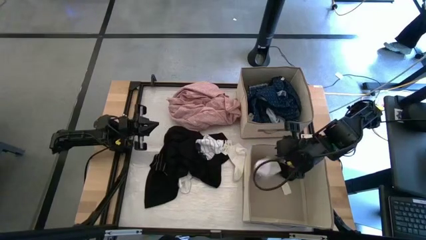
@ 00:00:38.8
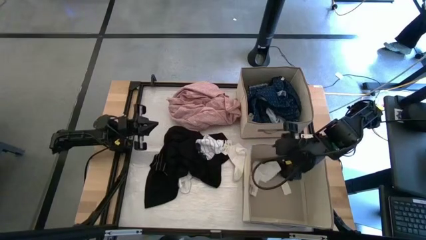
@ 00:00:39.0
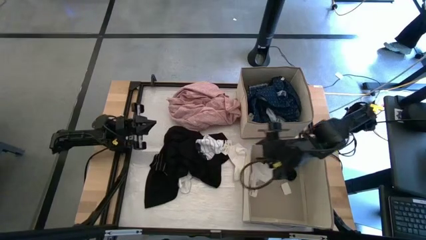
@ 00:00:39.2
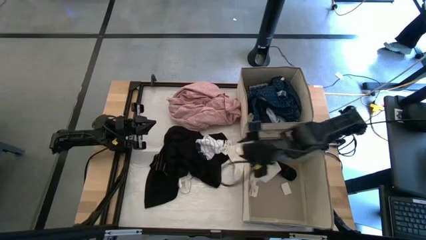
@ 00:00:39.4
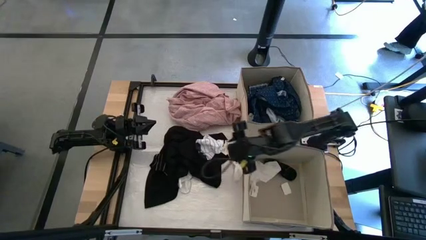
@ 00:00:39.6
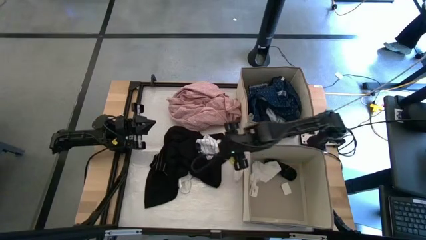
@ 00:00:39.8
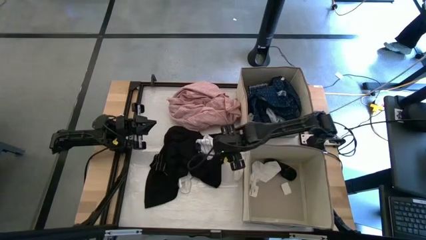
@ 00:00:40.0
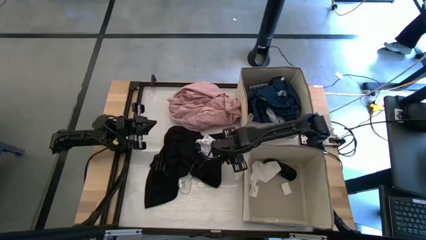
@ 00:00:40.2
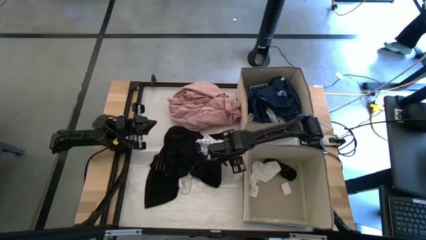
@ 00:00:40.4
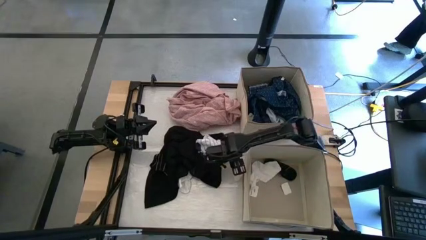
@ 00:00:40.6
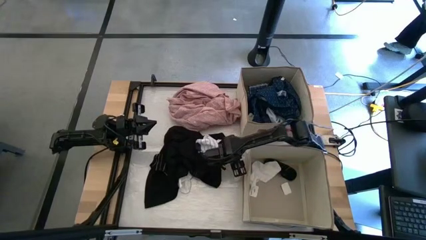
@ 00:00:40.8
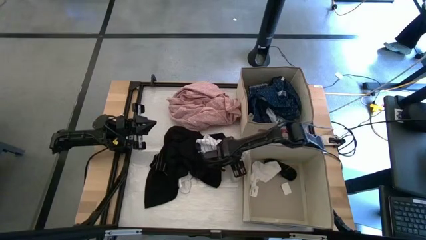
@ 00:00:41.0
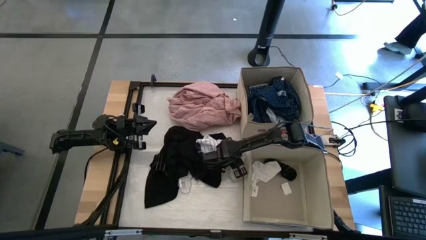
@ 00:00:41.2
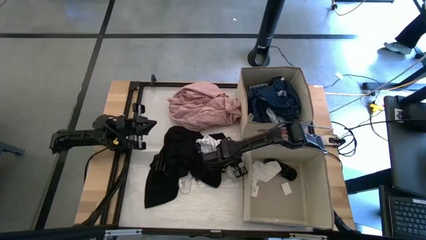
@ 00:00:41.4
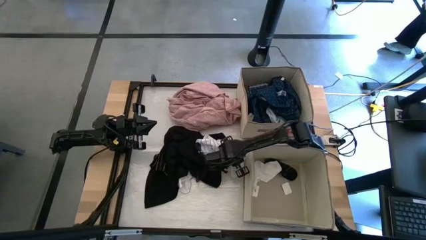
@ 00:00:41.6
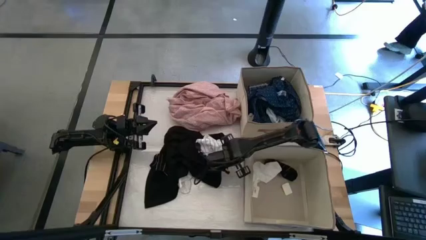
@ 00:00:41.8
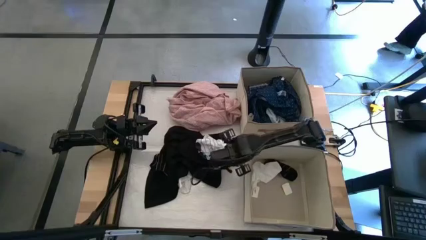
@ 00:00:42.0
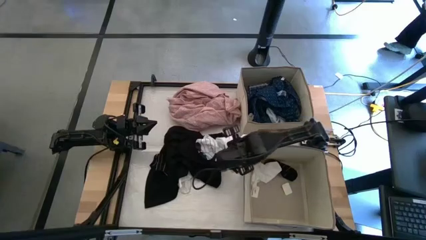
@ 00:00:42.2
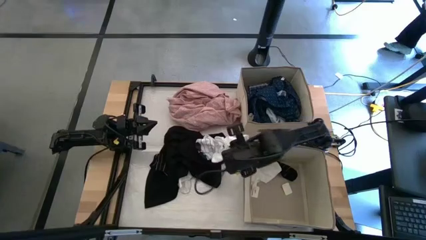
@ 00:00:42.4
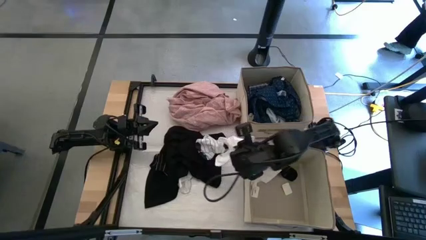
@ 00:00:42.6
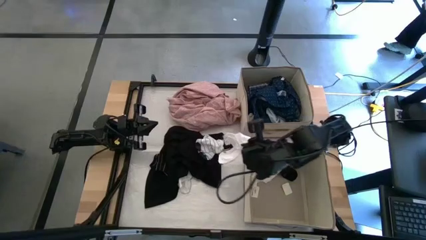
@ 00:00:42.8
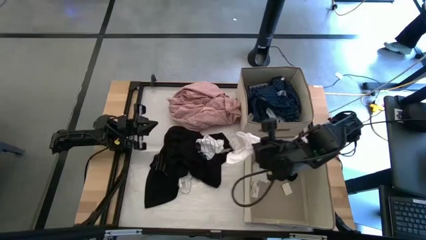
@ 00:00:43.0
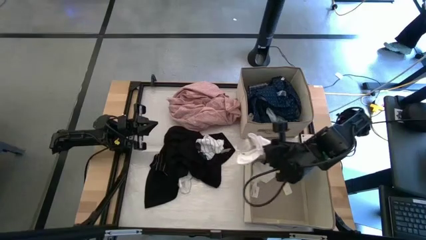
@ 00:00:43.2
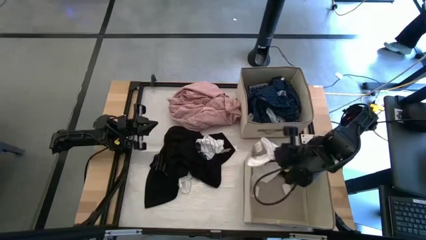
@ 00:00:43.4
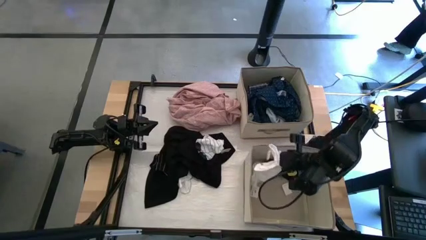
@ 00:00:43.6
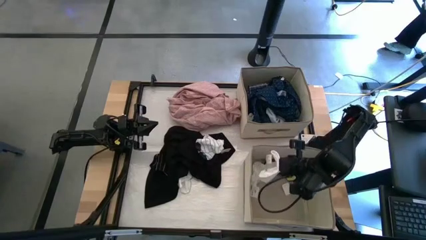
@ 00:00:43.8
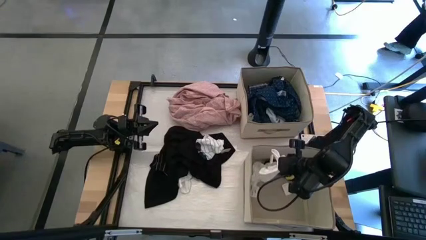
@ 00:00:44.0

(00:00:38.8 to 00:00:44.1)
Task: Sort clothes
Put the white sock into the bottom laundry organizer

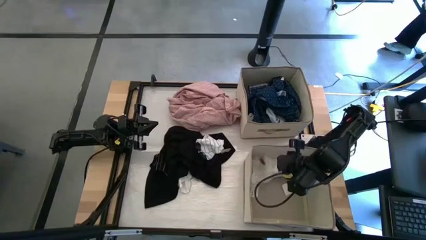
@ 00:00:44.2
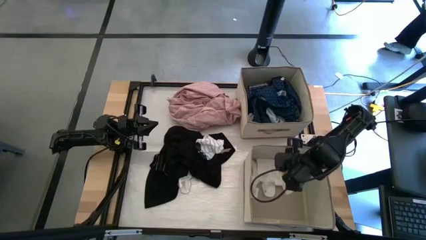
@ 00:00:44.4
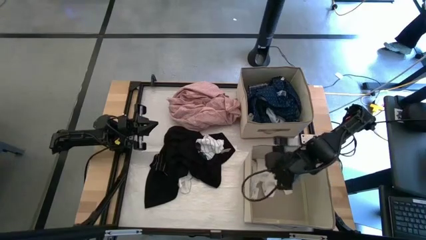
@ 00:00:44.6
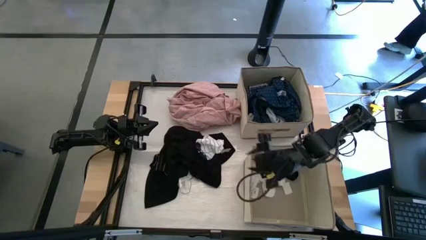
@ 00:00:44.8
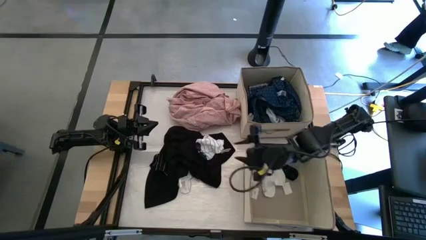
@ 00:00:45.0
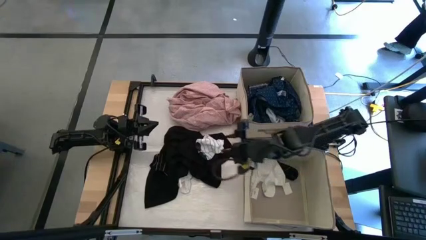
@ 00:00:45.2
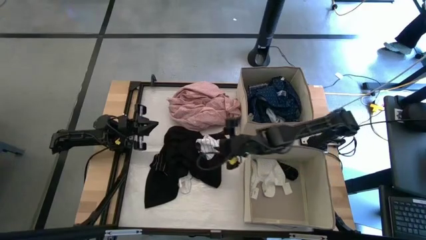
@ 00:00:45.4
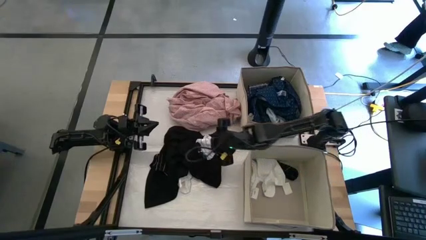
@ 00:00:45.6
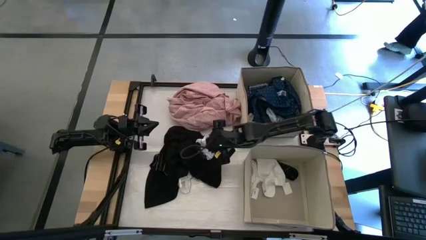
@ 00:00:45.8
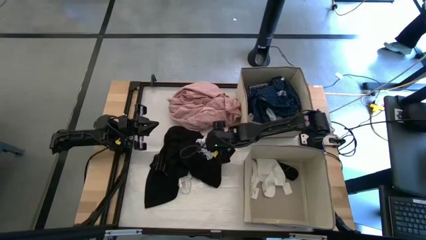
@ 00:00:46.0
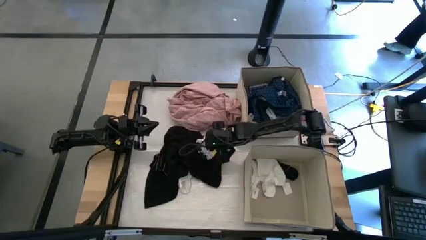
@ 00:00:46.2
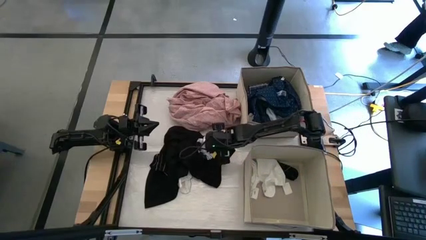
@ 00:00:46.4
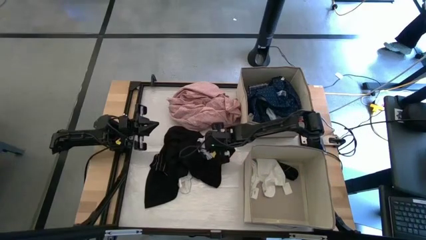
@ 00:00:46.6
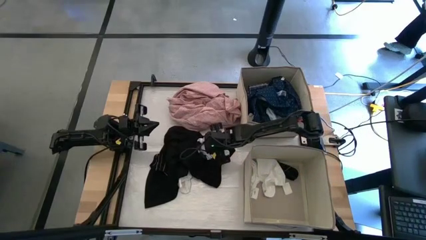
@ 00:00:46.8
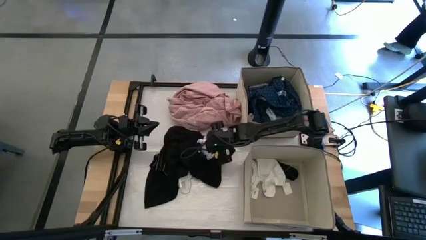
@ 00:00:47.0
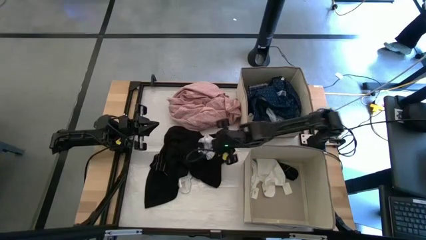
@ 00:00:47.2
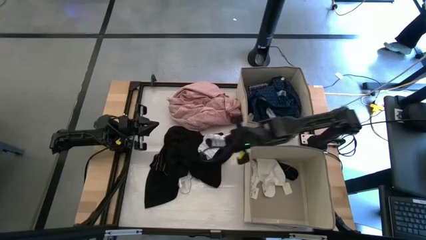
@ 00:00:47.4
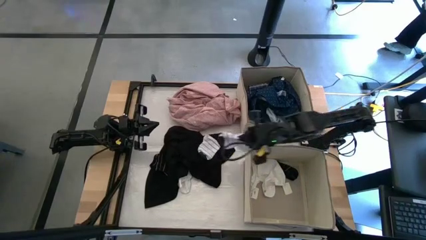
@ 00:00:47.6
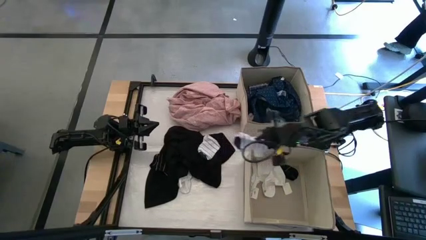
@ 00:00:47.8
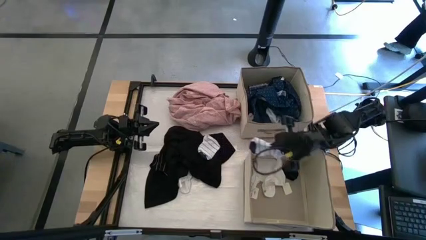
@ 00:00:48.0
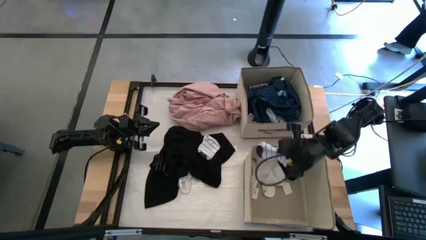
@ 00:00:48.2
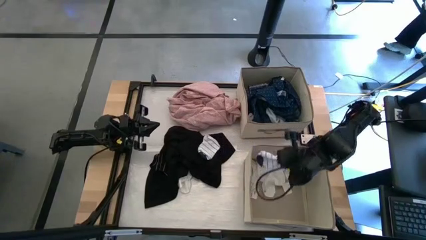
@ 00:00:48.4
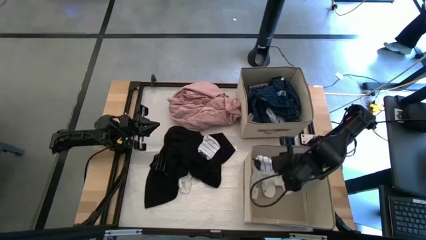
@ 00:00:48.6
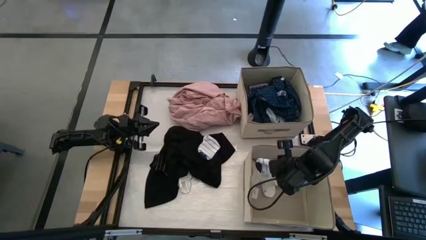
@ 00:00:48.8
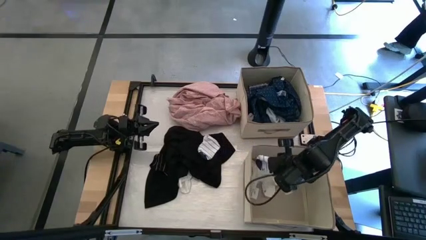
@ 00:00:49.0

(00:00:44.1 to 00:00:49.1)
Put the white striped sock into the bottom laundry organizer

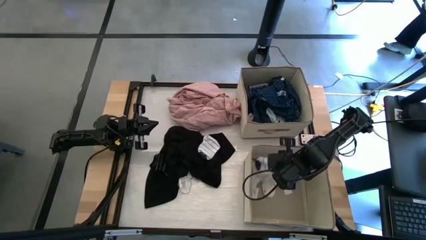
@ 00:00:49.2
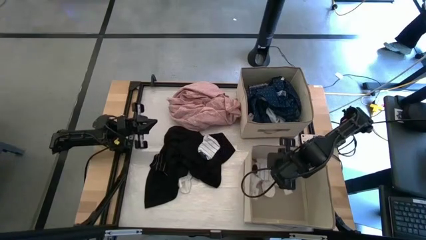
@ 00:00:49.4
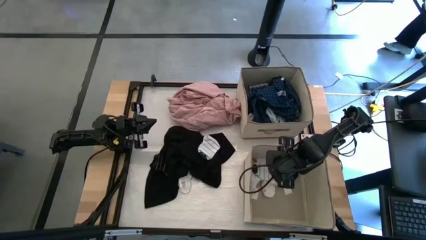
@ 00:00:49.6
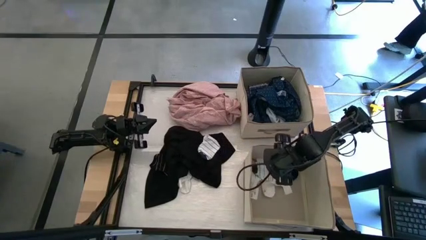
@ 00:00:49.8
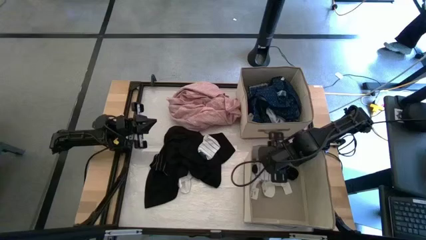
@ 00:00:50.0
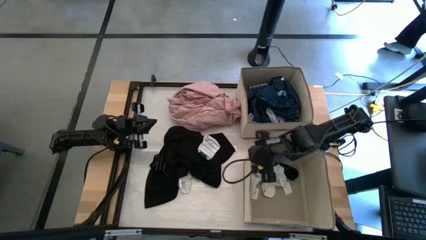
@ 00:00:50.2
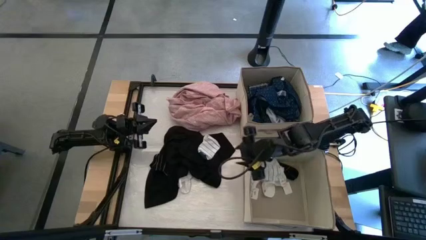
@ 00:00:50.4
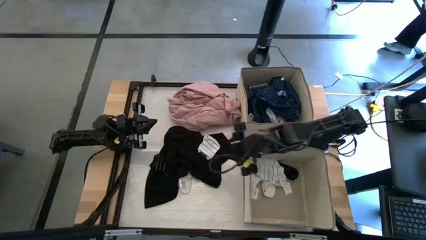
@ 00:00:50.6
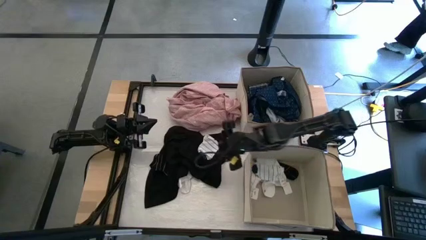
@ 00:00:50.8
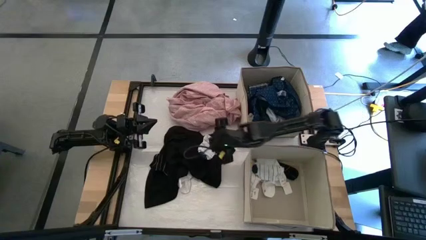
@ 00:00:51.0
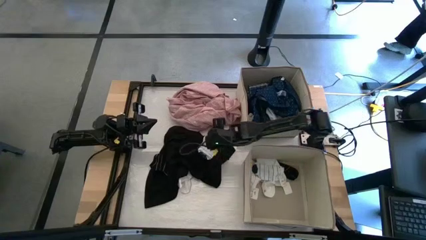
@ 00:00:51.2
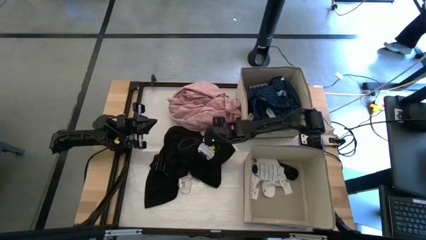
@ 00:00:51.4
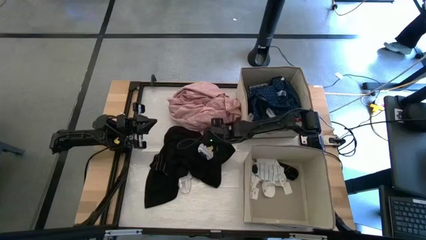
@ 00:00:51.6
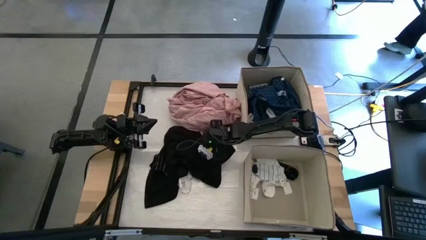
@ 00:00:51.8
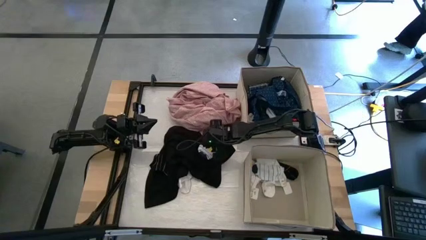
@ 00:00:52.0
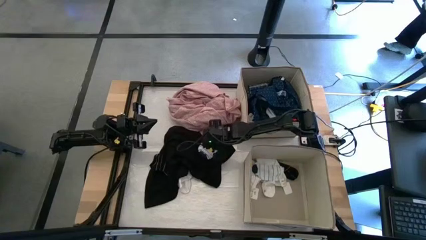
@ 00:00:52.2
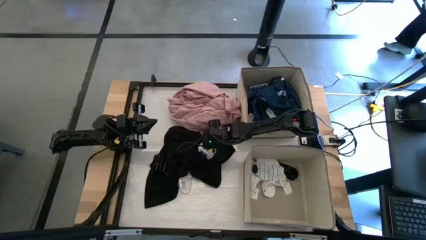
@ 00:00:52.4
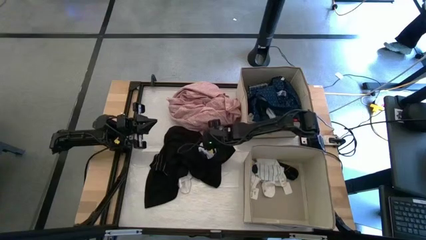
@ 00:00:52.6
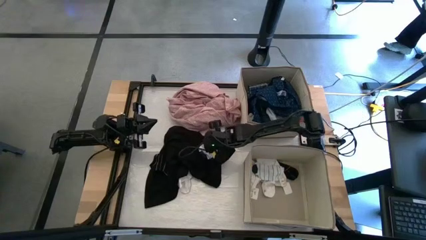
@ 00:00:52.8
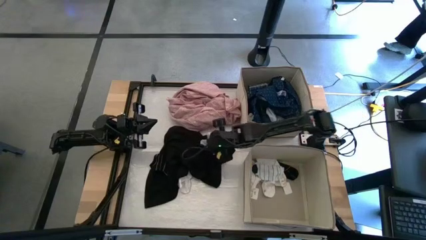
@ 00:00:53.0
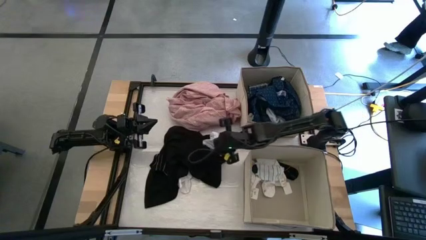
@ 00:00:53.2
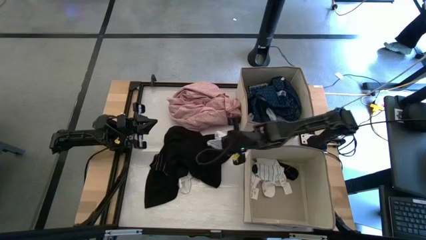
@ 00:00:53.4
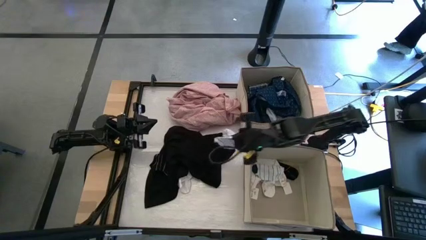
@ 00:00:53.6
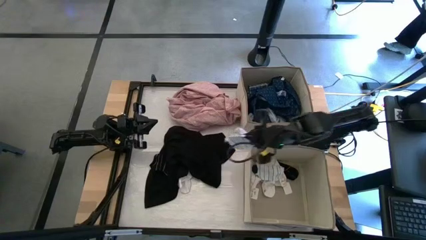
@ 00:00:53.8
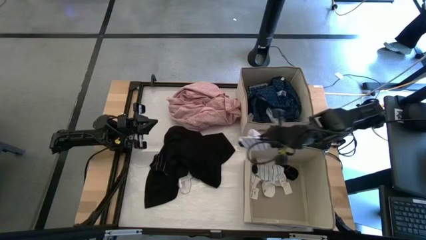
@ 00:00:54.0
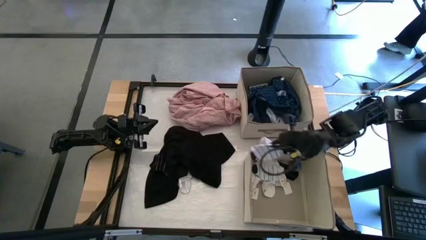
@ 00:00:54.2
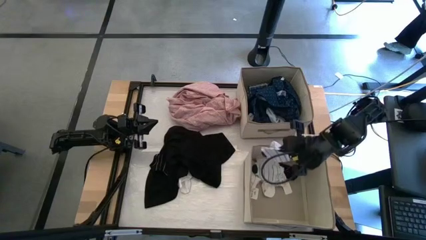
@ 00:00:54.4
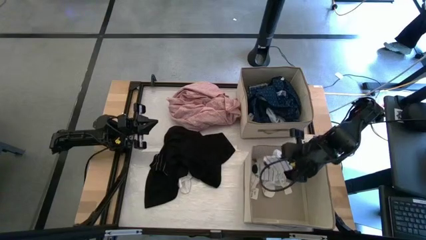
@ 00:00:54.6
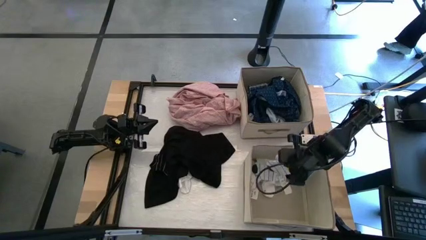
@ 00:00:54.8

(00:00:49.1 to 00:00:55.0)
Put the white striped sock into the bottom laundry organizer
